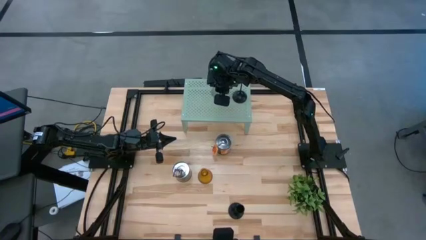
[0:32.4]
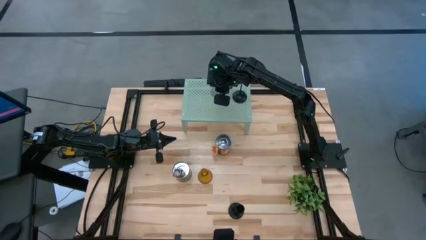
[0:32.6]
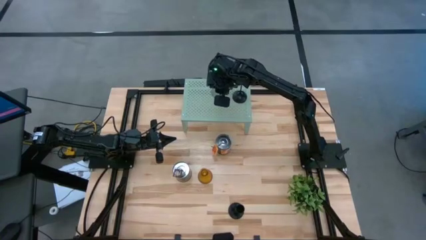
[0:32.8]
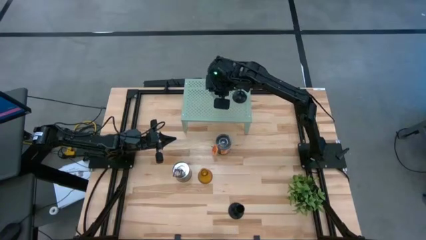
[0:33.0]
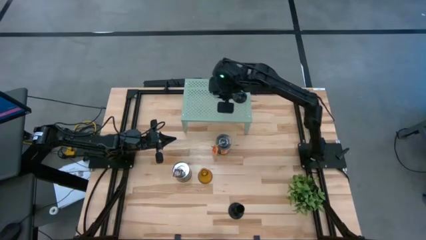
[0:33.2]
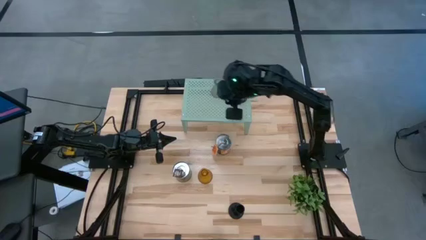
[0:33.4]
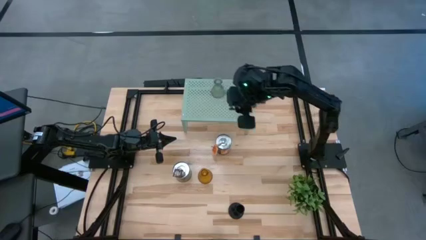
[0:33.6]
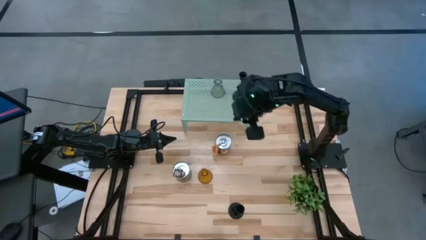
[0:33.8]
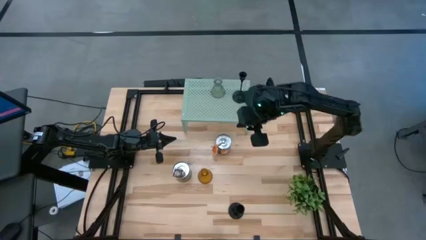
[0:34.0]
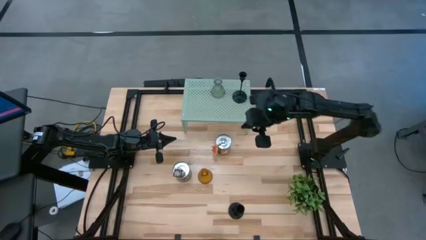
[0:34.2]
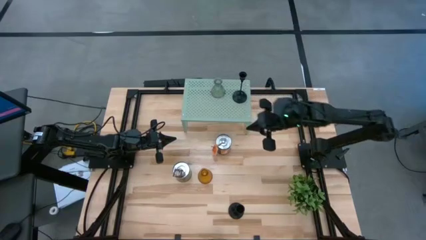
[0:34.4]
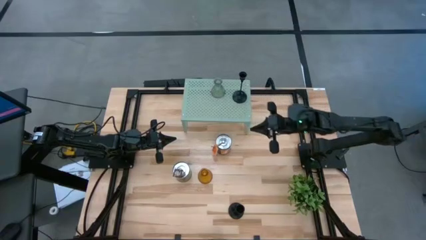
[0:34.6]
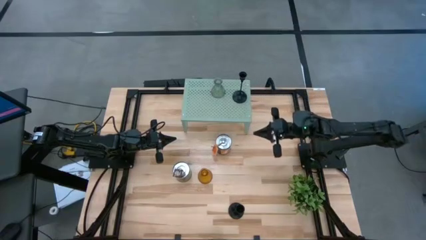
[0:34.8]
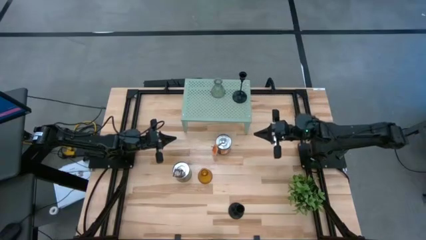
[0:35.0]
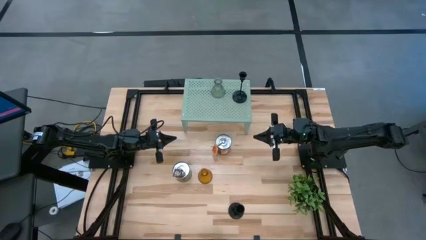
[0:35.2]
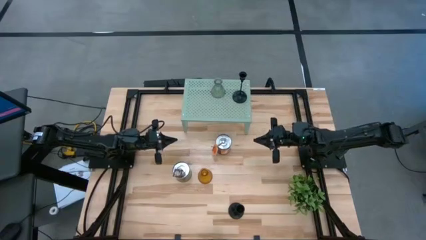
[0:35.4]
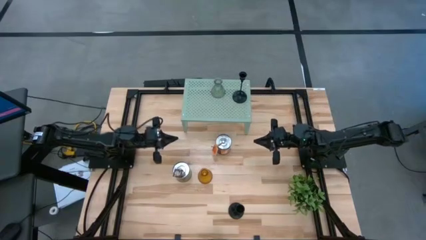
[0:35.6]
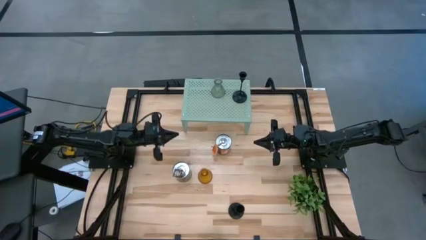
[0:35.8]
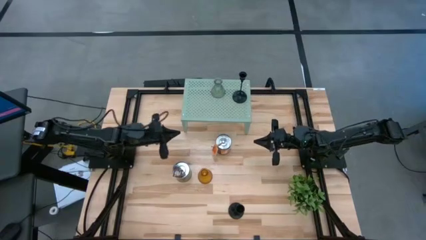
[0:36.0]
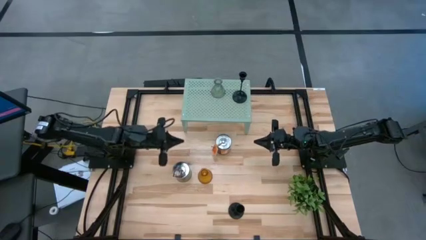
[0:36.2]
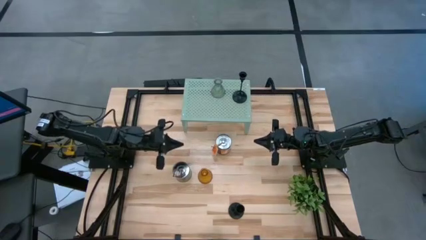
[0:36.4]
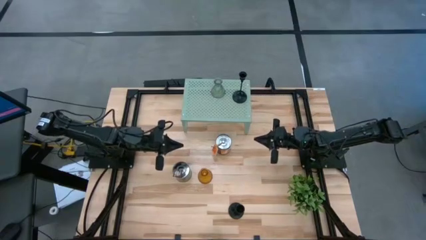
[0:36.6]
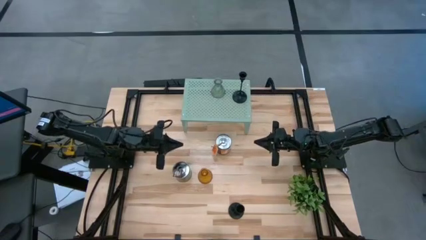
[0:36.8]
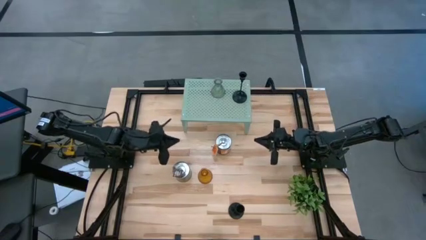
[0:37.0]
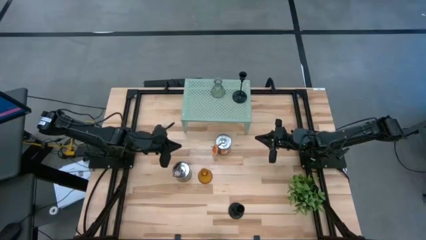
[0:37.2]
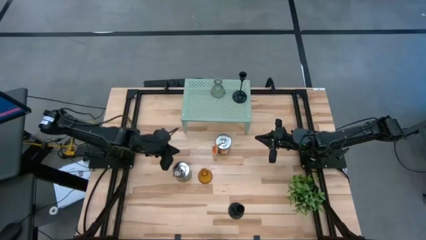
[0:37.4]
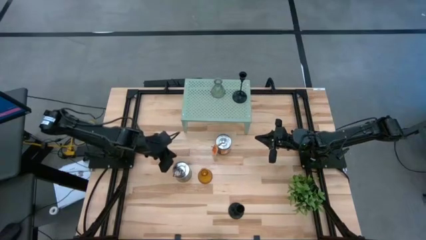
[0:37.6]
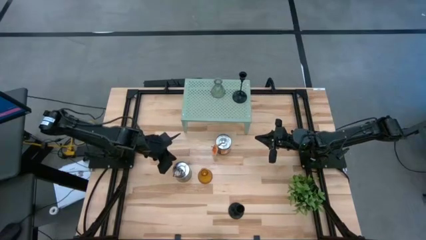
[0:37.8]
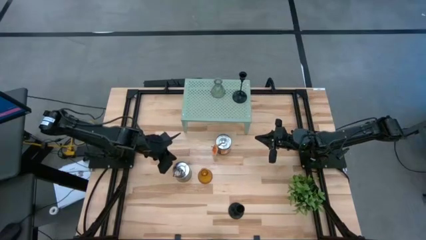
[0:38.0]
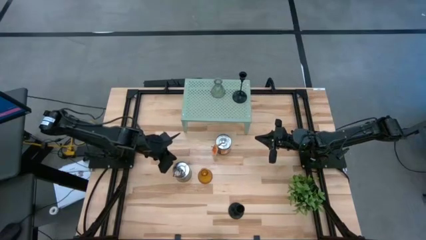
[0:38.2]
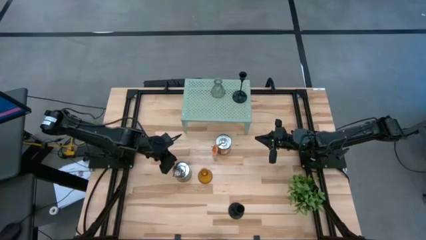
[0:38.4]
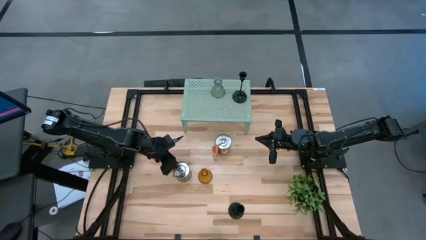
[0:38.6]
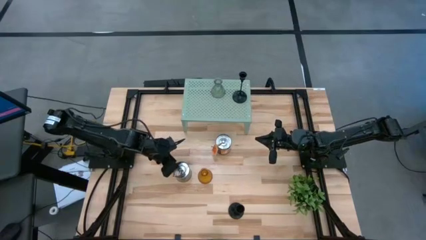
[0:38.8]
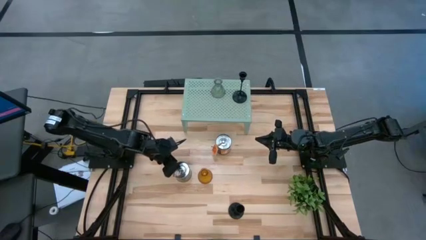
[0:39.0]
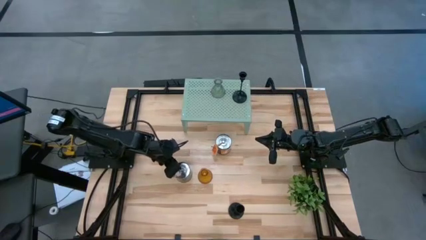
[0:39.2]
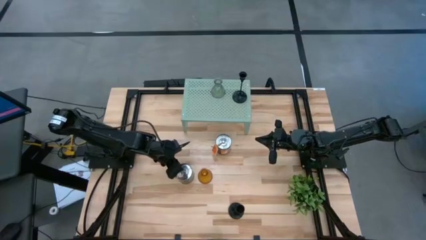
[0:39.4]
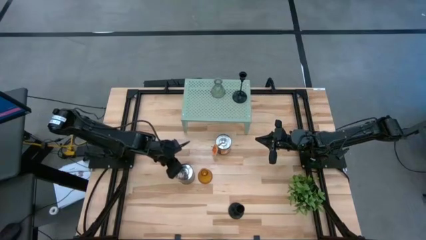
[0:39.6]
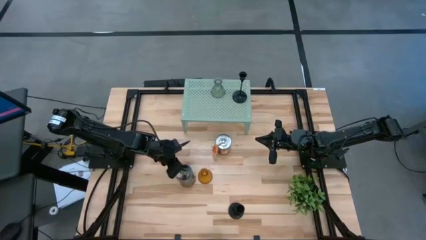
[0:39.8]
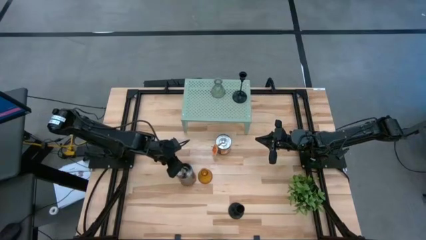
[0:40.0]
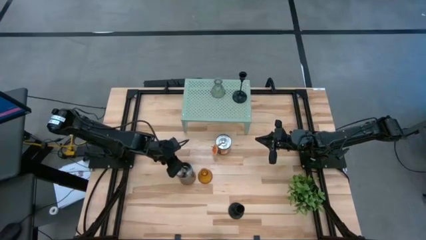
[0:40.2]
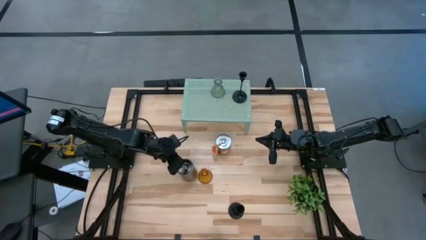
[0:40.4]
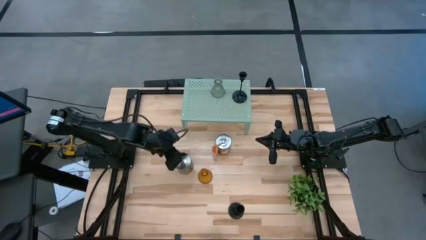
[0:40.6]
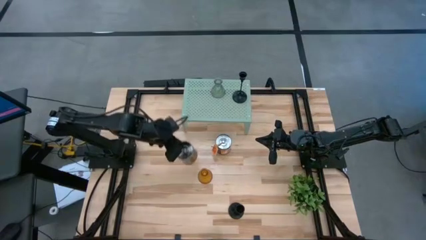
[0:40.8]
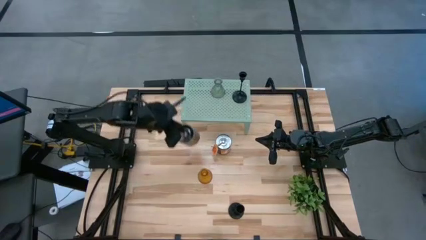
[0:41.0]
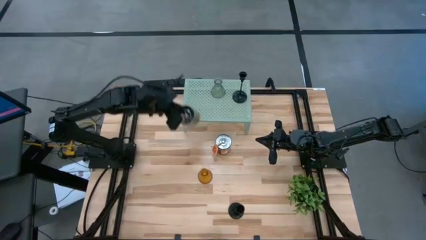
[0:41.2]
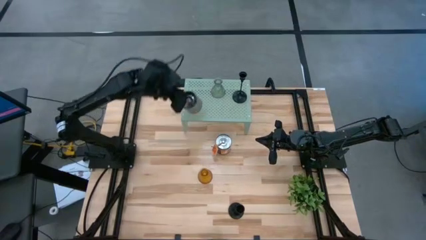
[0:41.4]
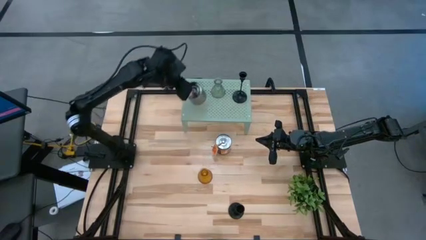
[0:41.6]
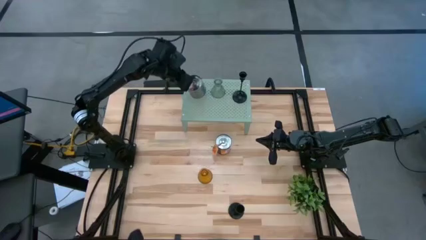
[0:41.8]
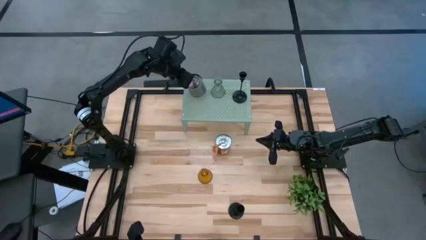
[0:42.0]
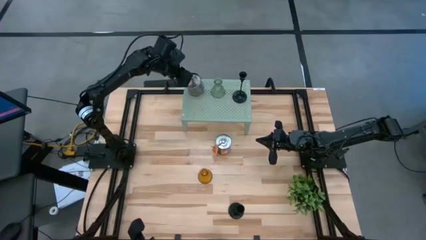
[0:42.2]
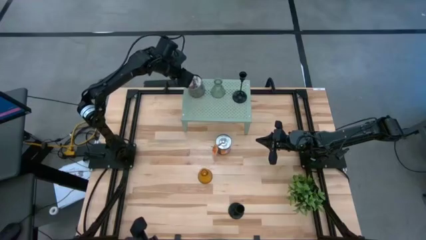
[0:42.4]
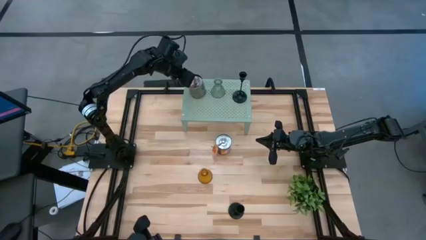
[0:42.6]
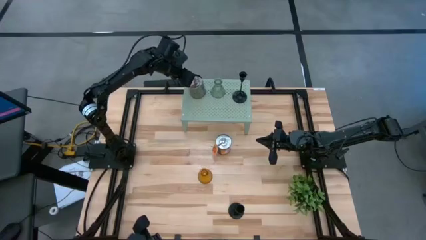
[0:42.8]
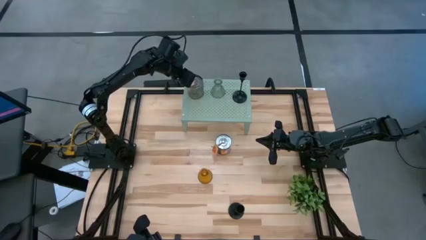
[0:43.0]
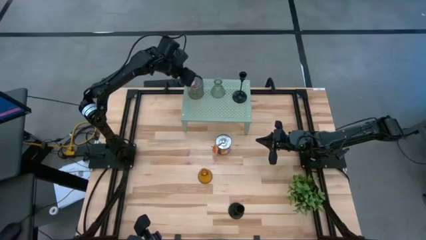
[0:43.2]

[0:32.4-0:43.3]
Task: Pick & Place candle stick holders
Put the bottom silver scented candle on the shelf

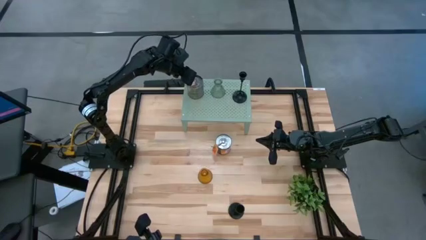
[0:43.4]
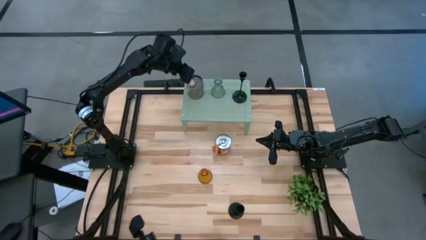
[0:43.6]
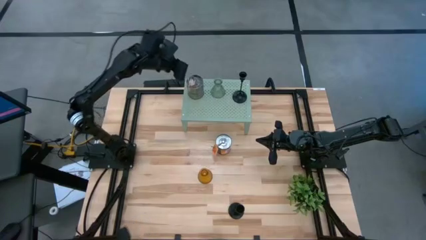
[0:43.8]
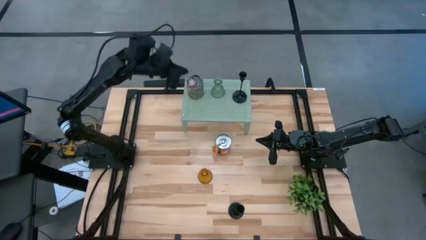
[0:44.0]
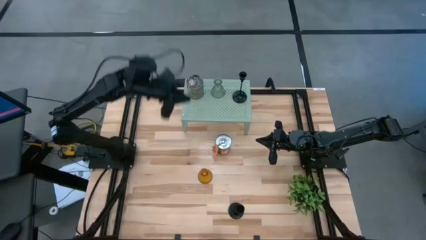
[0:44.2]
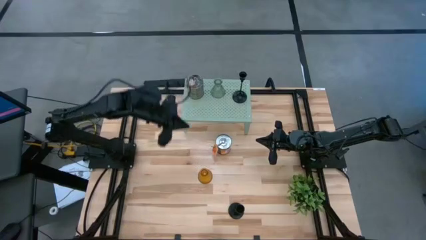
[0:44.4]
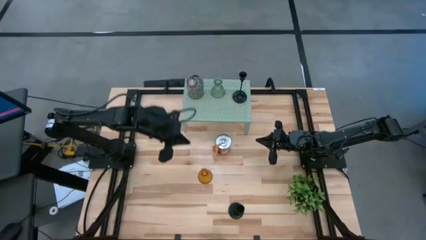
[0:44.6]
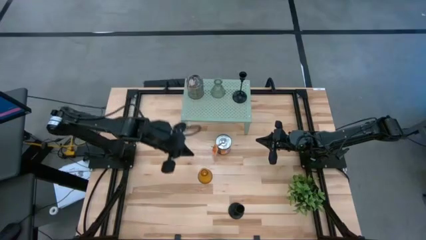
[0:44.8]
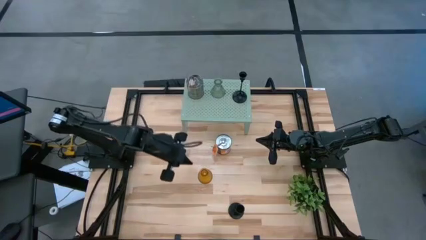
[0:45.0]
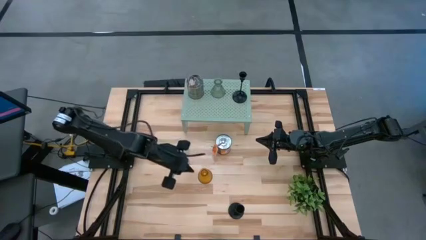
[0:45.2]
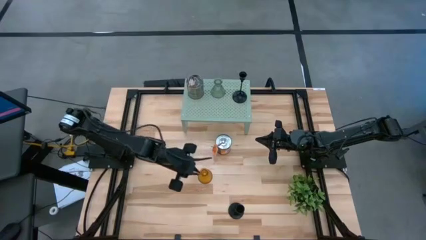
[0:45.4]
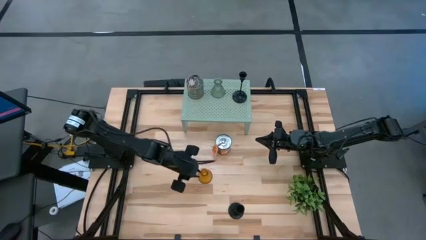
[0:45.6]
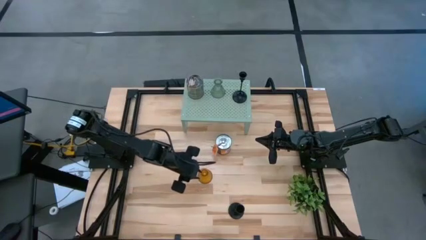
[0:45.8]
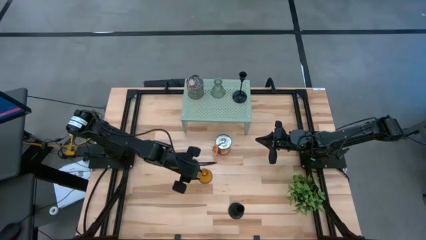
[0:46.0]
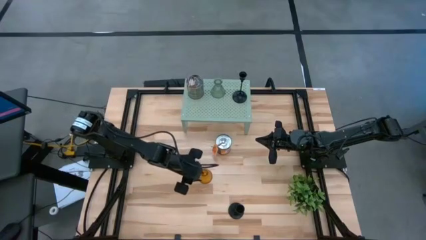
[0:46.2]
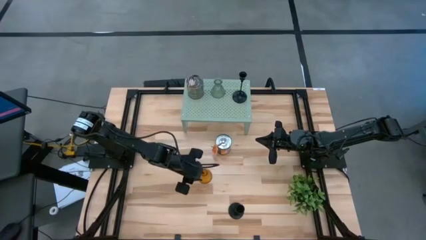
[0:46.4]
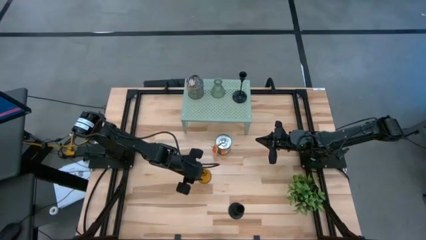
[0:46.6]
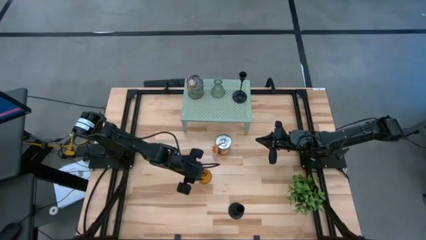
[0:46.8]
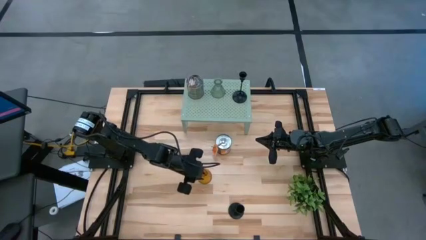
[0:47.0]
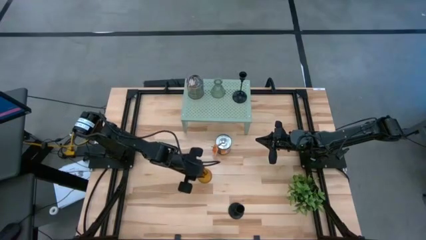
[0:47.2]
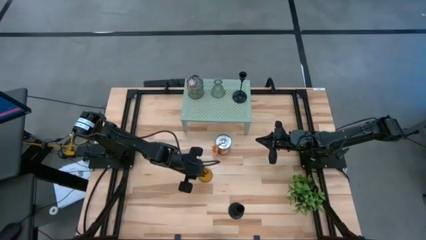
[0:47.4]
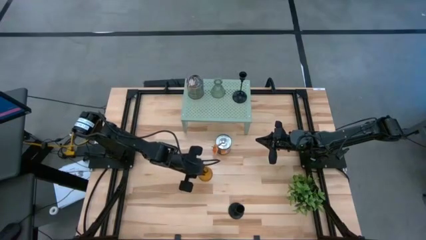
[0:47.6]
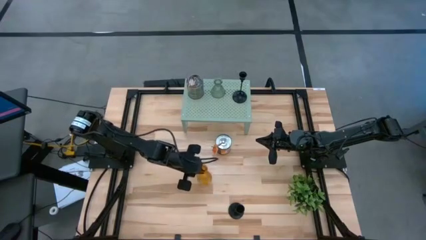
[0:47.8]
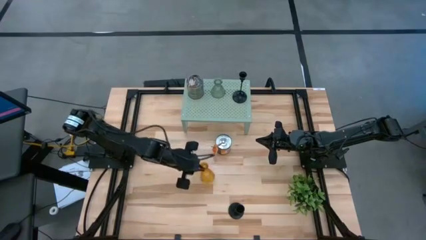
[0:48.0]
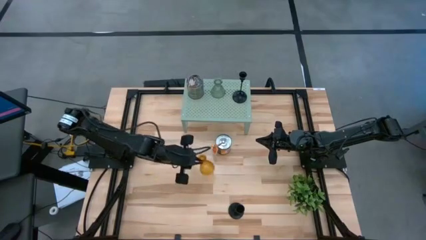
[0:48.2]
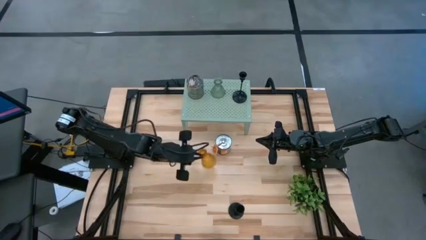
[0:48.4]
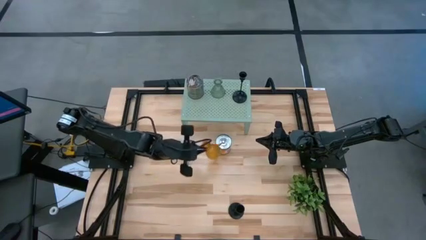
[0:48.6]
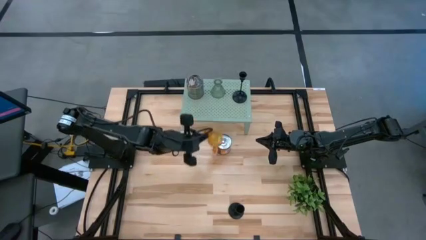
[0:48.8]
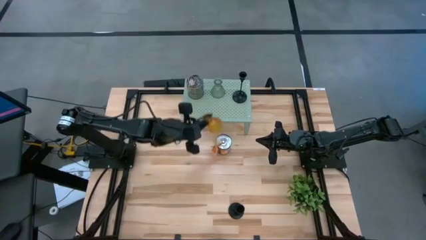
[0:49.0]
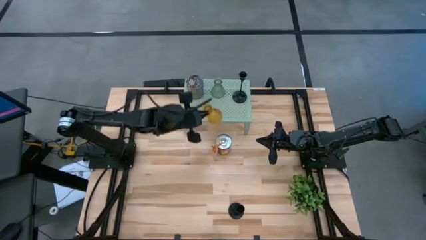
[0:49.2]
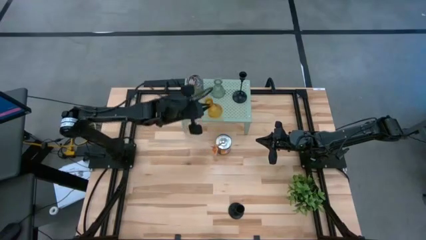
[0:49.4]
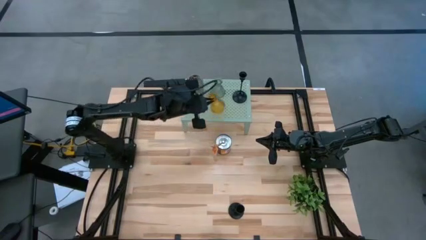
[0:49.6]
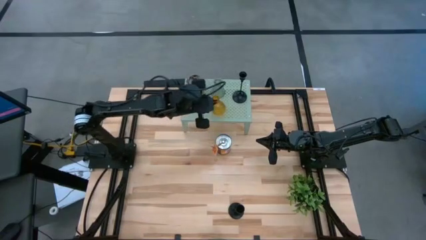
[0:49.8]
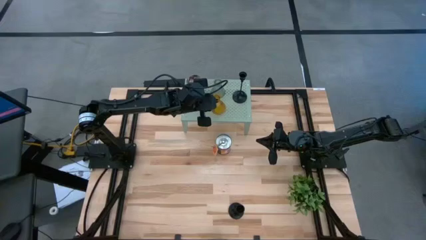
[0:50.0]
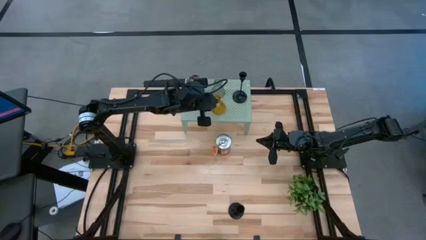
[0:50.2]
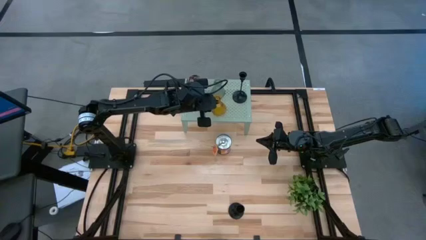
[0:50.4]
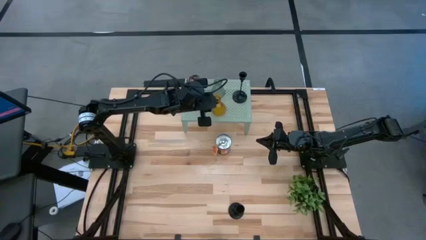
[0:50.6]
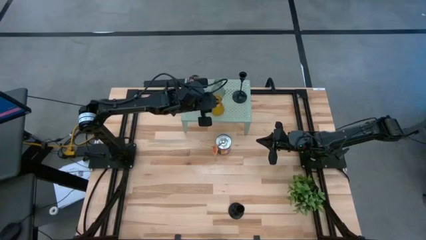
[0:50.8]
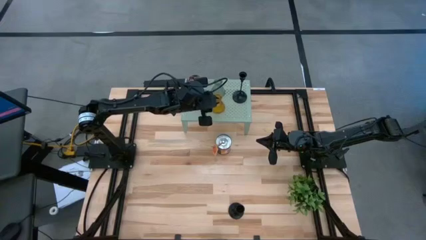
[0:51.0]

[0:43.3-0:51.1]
Put the yellow candle holder on the shelf
